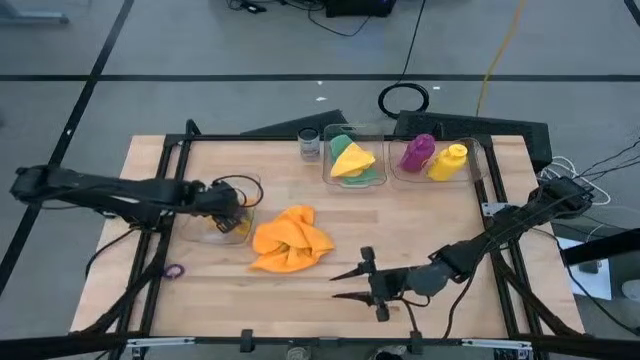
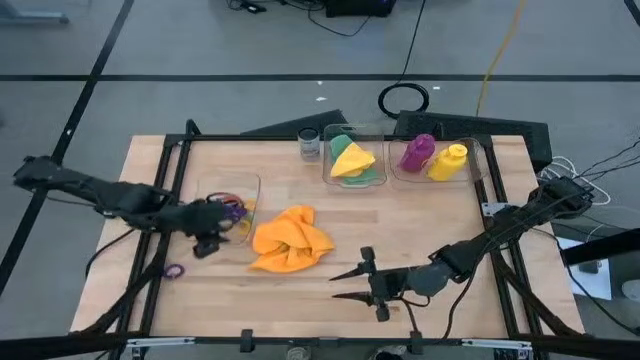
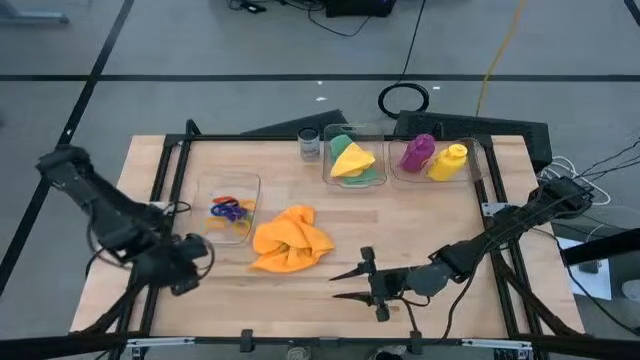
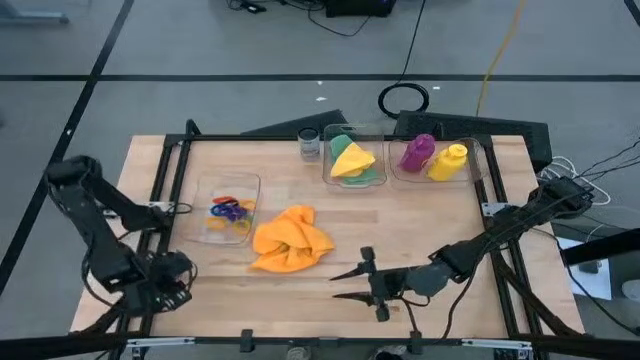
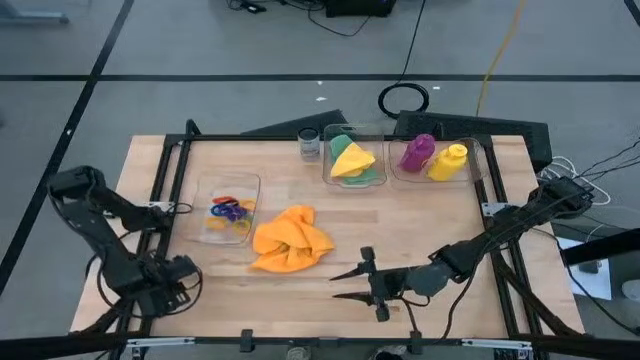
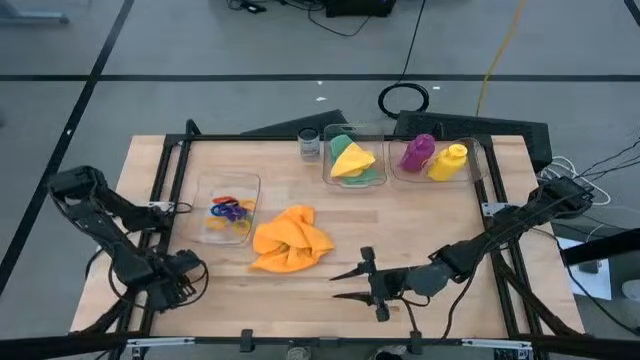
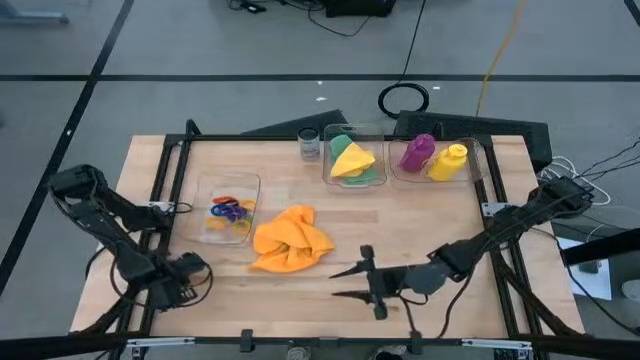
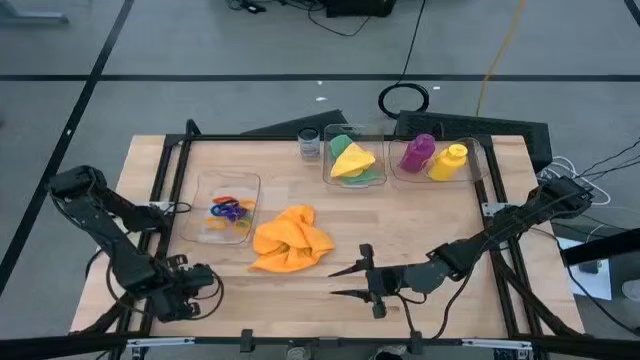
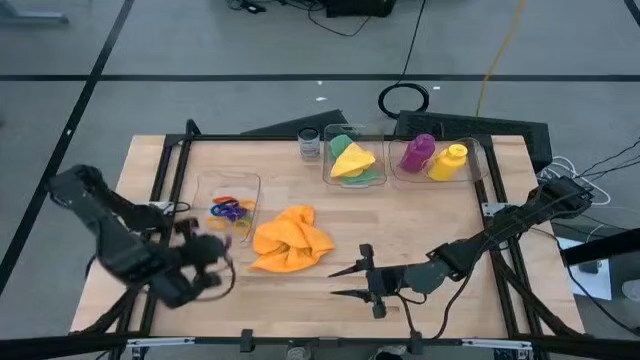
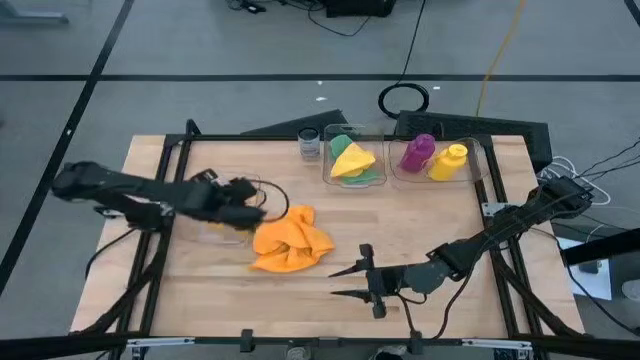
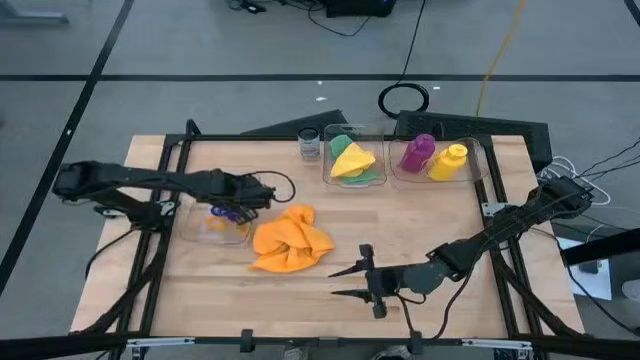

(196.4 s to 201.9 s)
Task: Pick & Place Sports Items
Put the purple spring keychain into the bottom transparent bin

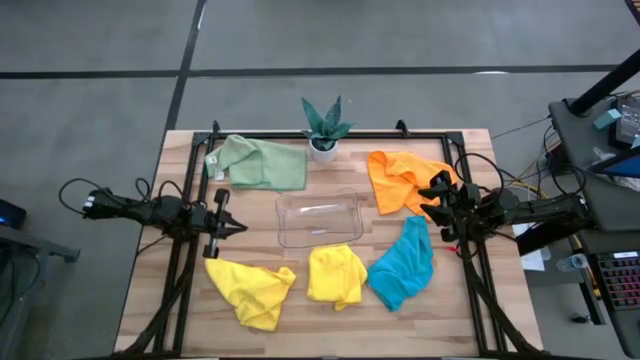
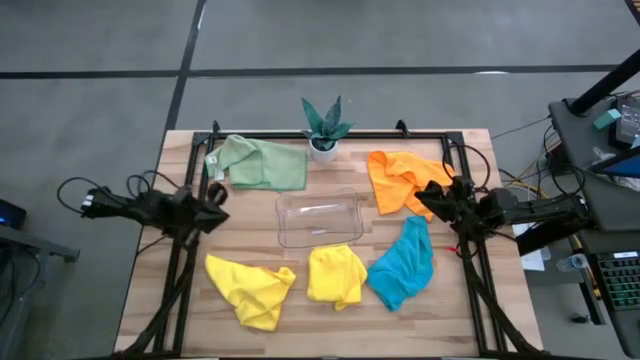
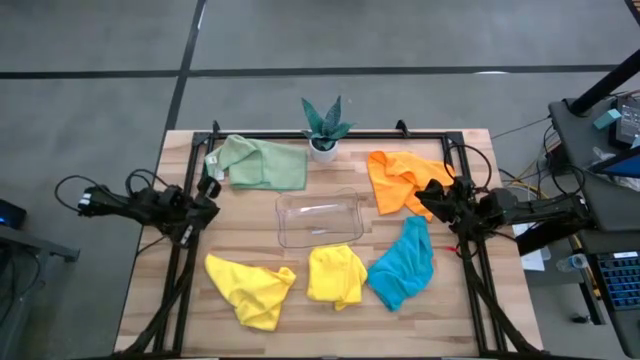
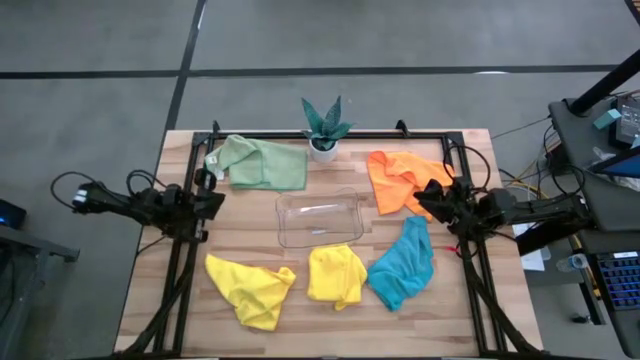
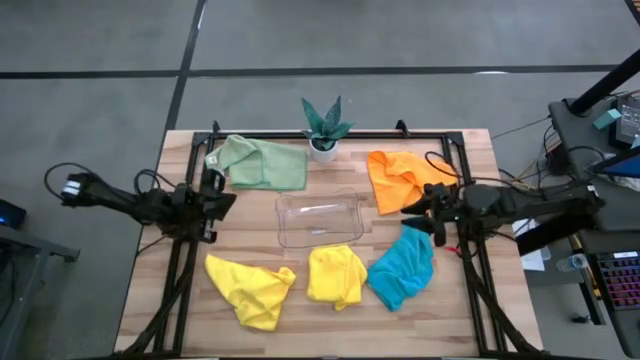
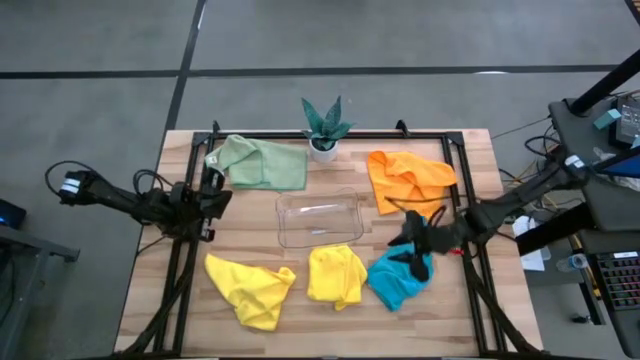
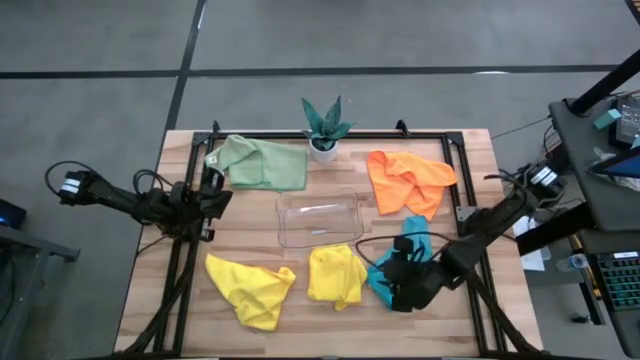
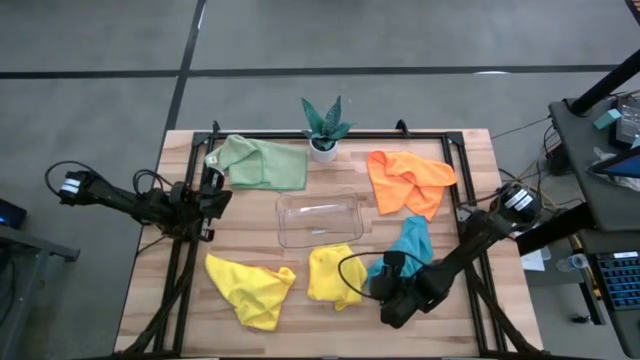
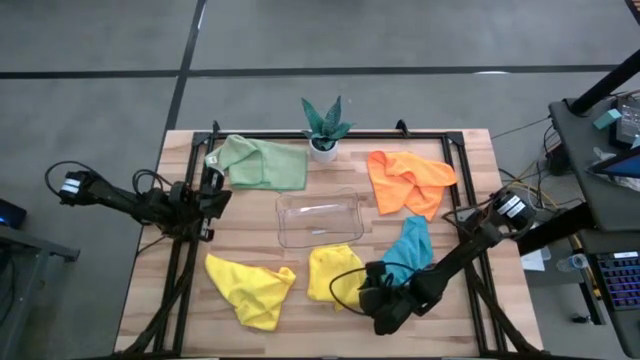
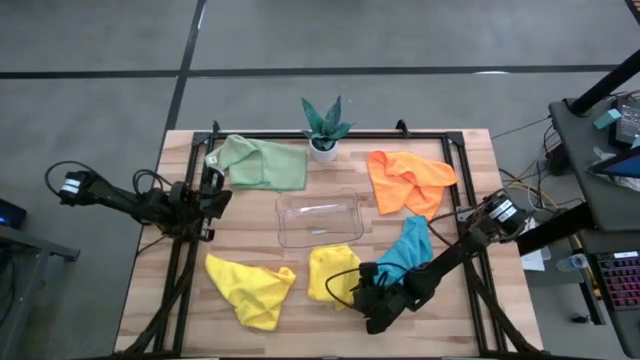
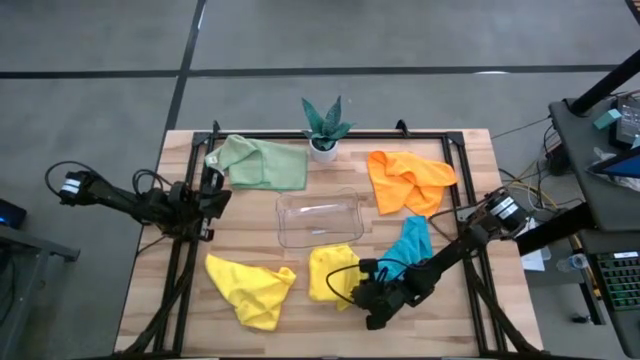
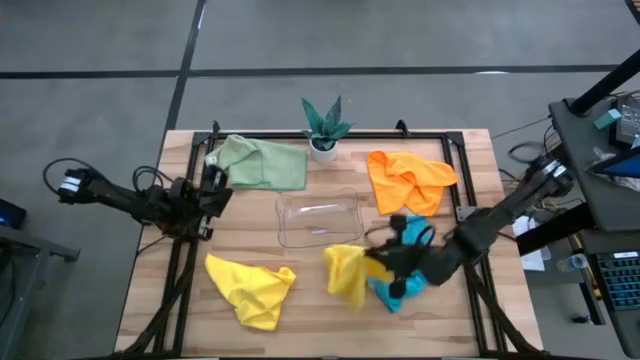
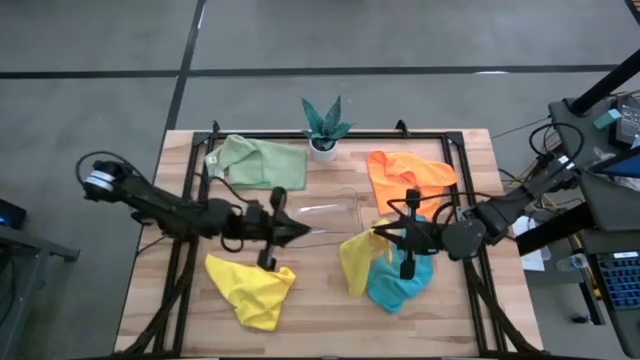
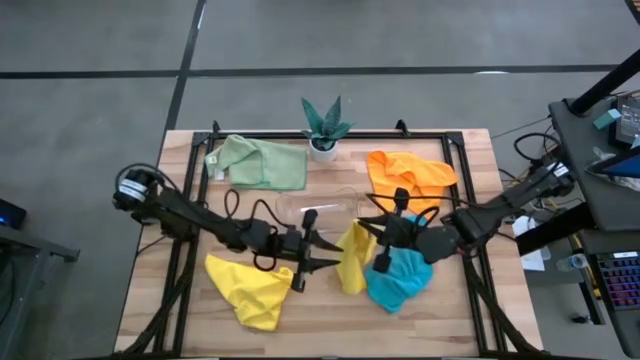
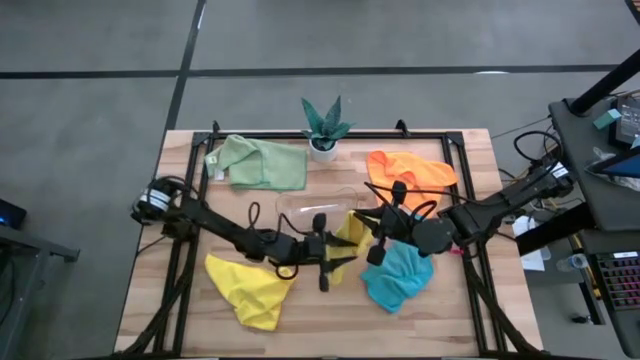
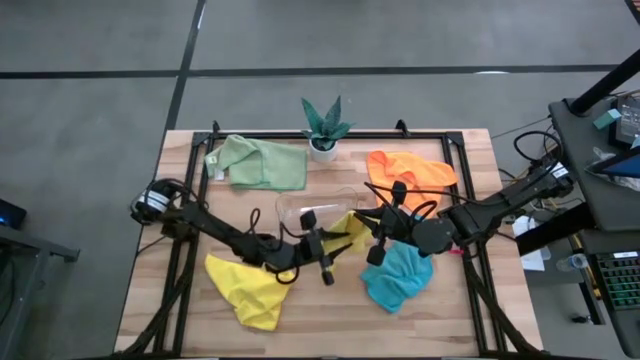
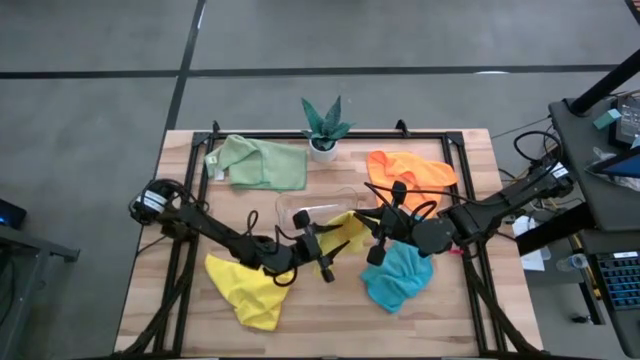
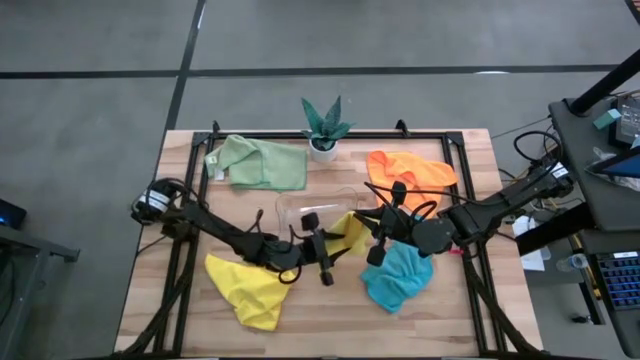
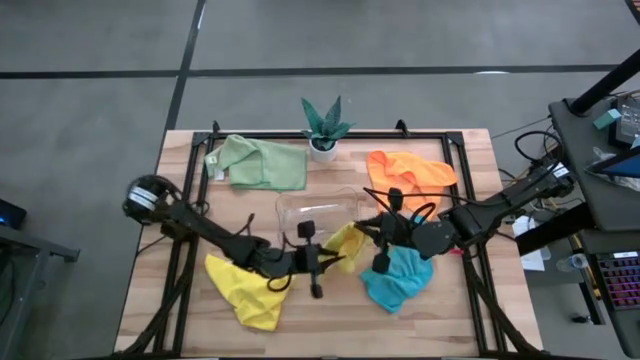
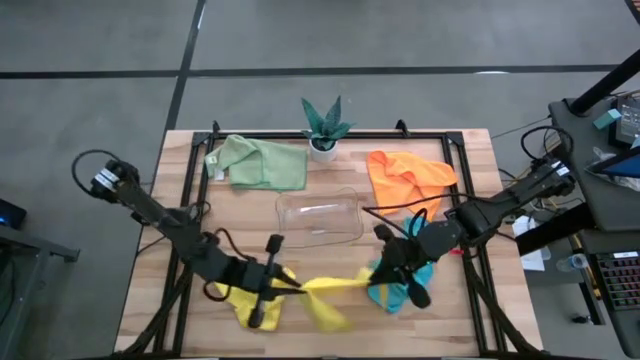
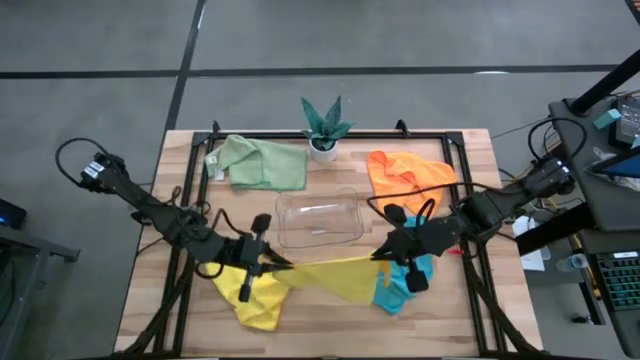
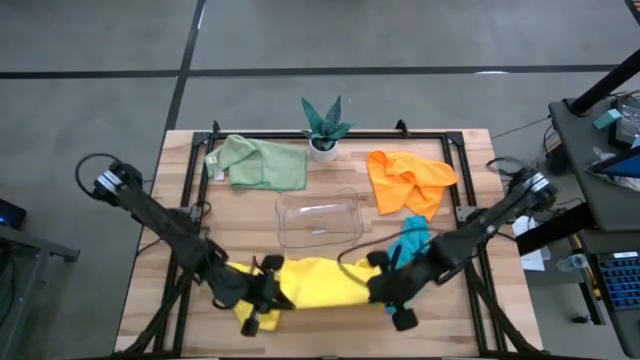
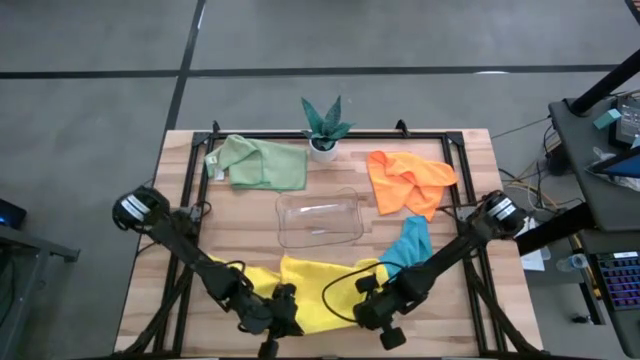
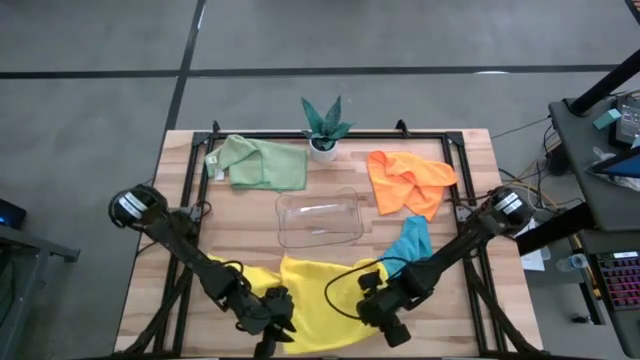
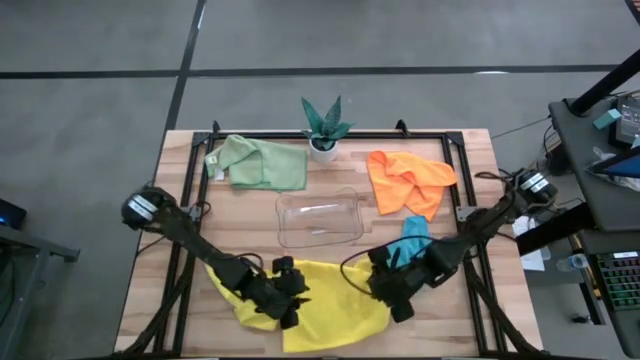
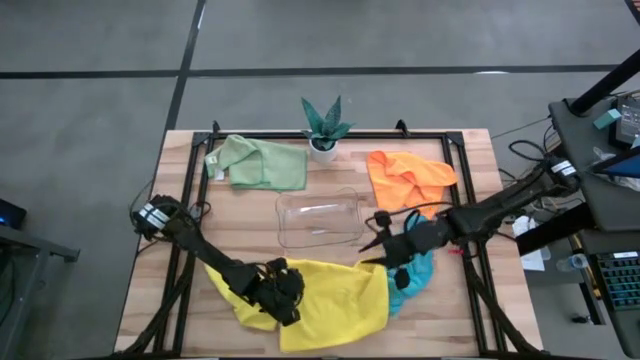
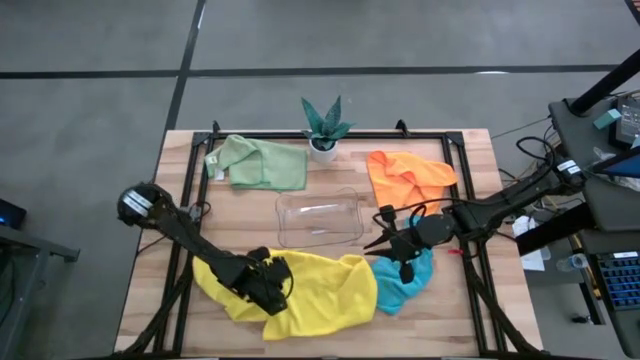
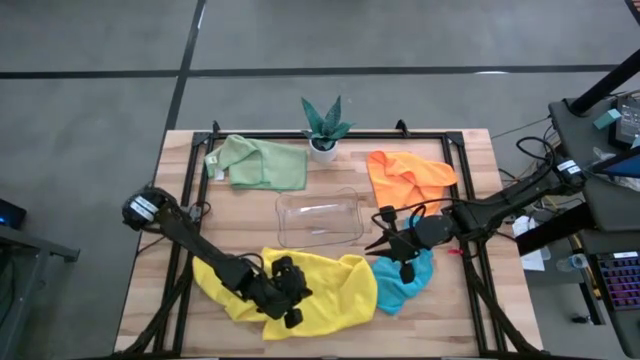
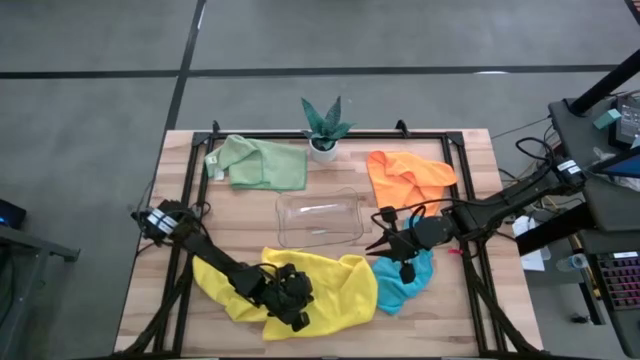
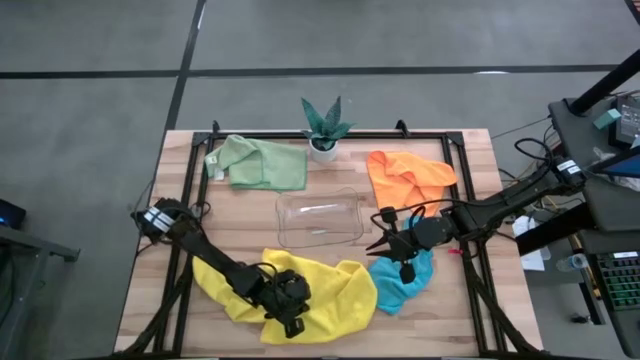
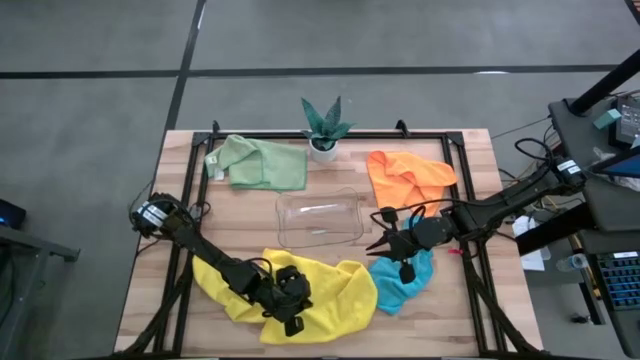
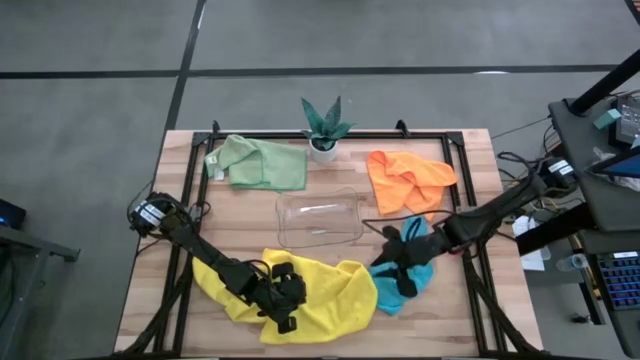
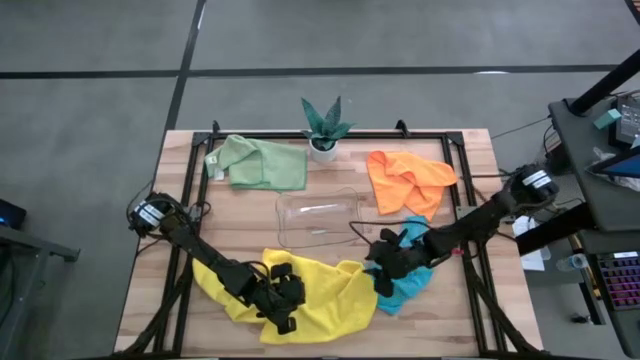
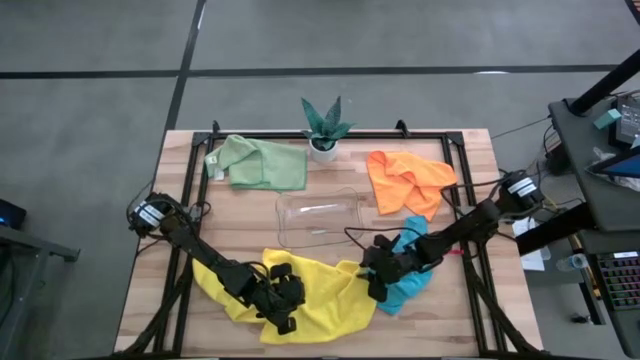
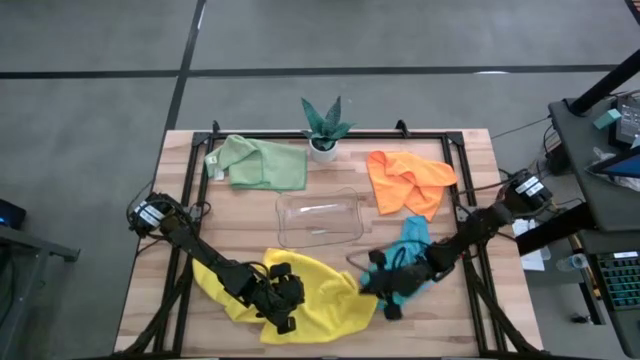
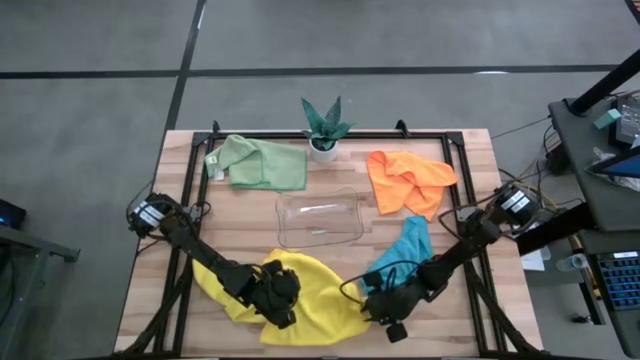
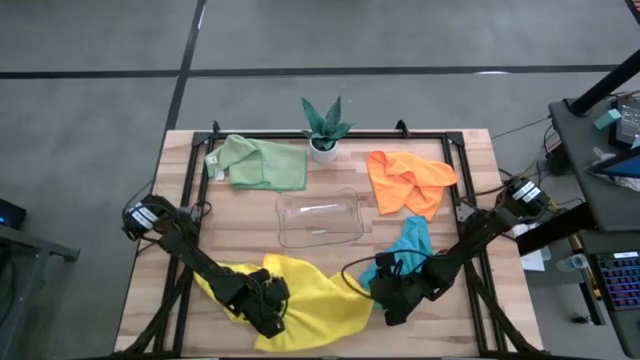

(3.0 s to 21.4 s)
Task: Fold microfiber towels
Fold the right yellow microfiber towel
